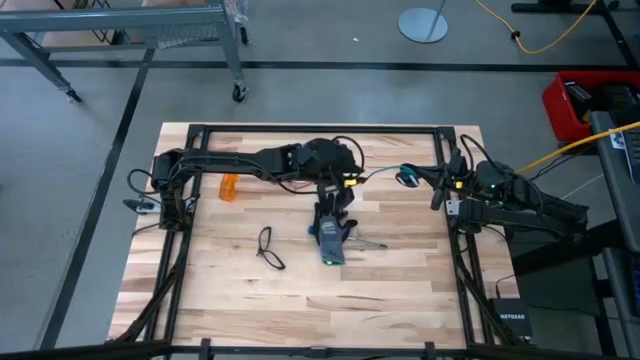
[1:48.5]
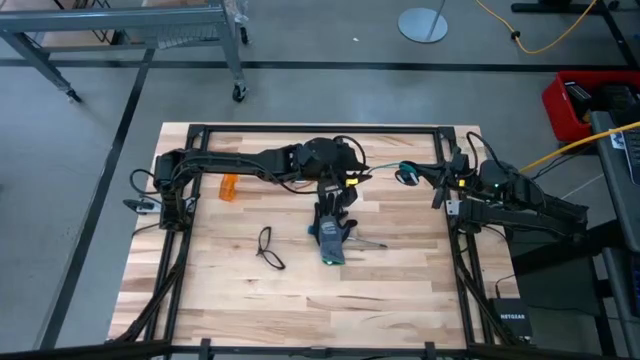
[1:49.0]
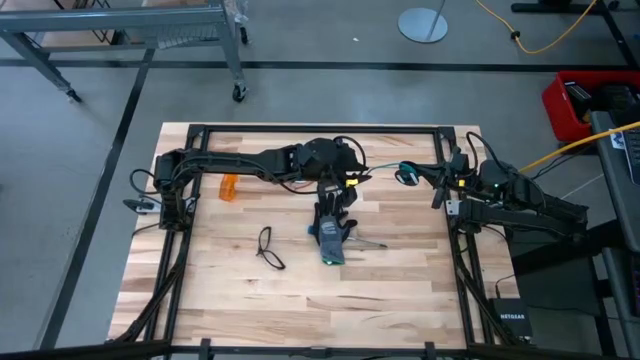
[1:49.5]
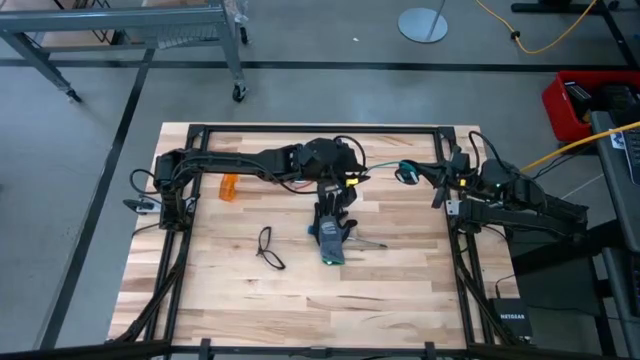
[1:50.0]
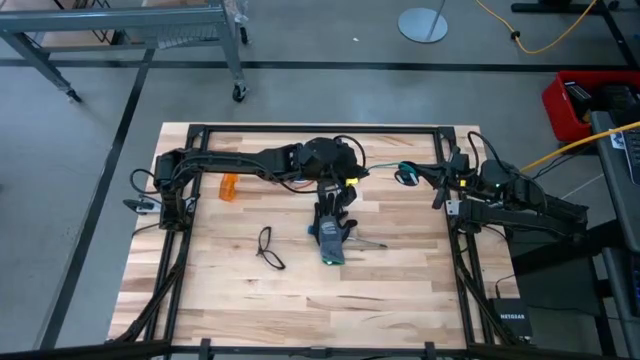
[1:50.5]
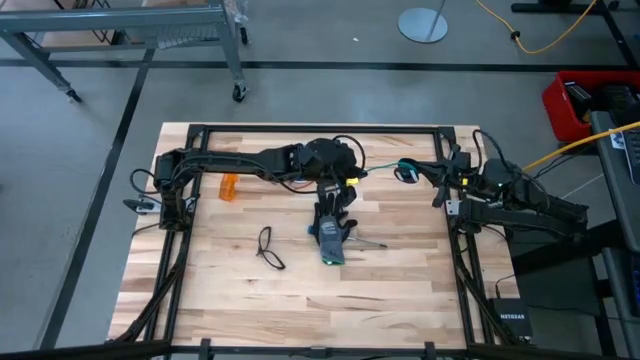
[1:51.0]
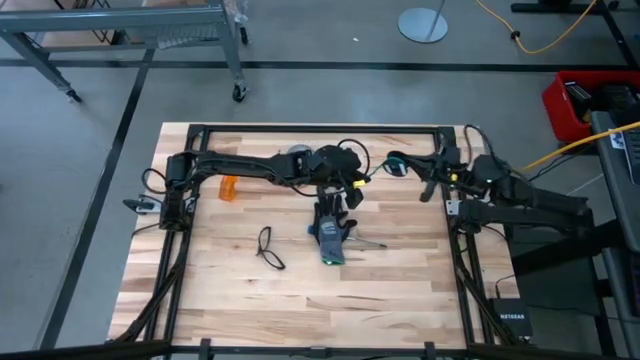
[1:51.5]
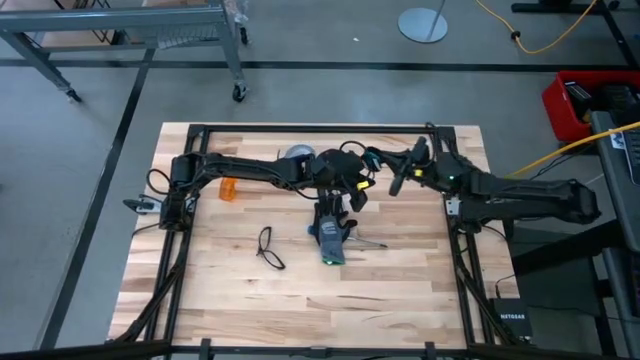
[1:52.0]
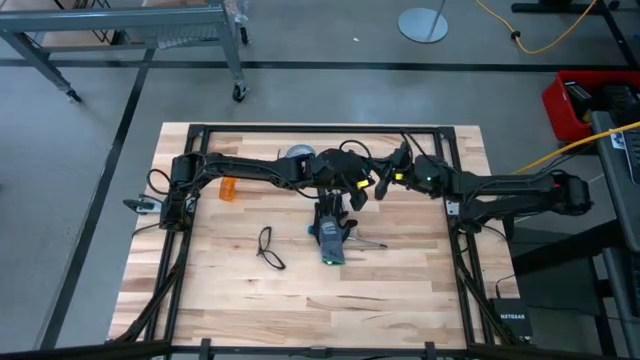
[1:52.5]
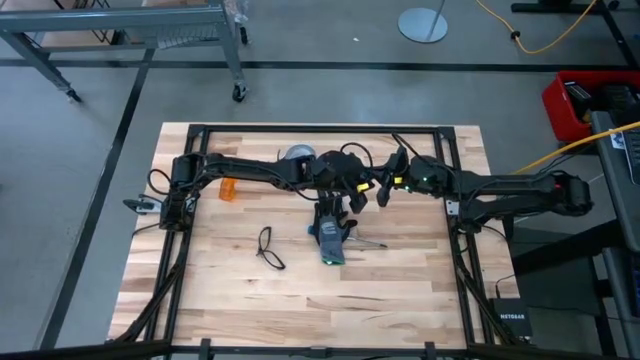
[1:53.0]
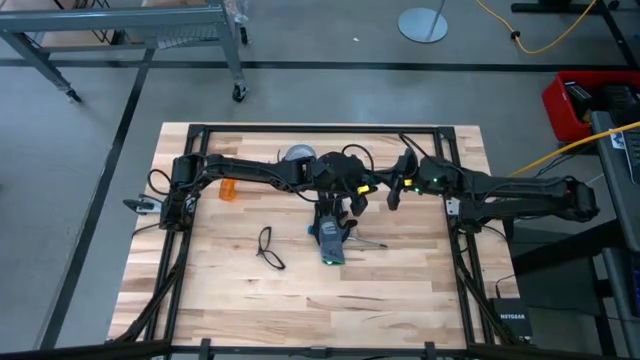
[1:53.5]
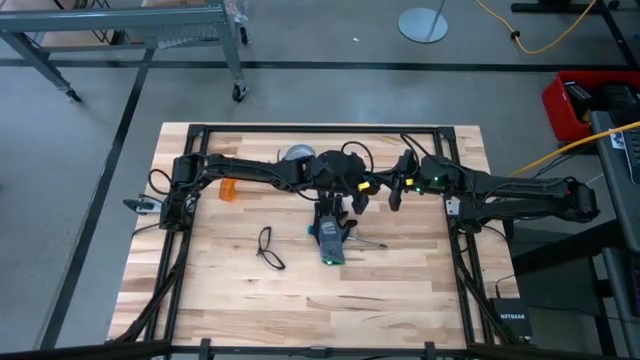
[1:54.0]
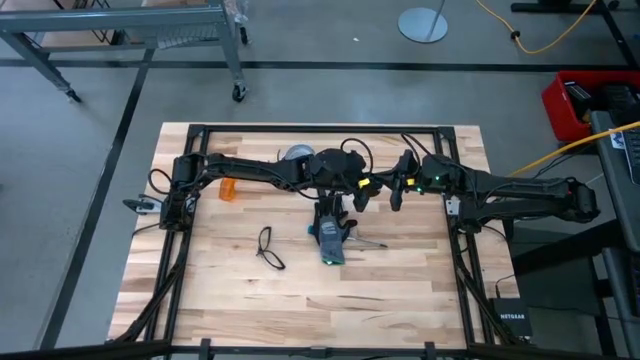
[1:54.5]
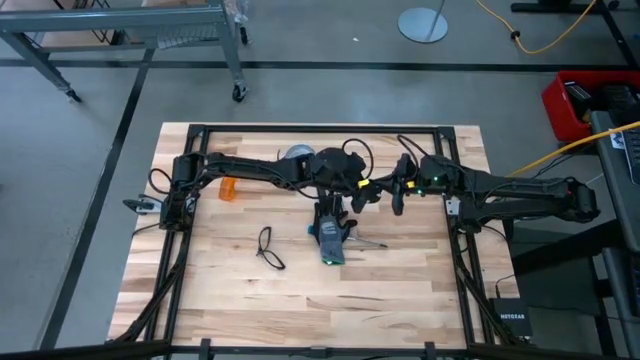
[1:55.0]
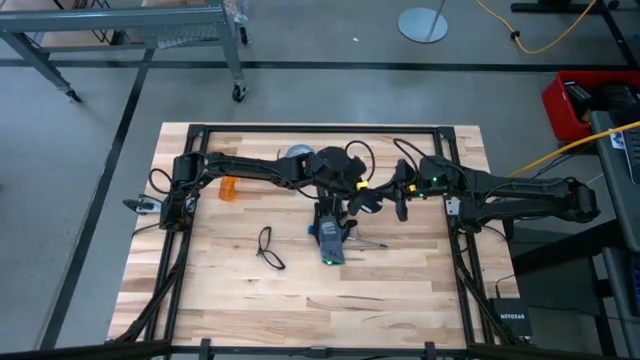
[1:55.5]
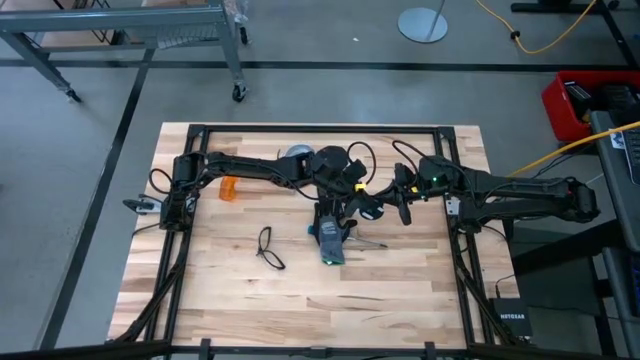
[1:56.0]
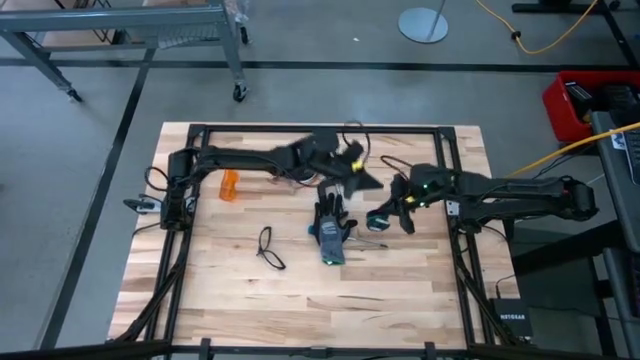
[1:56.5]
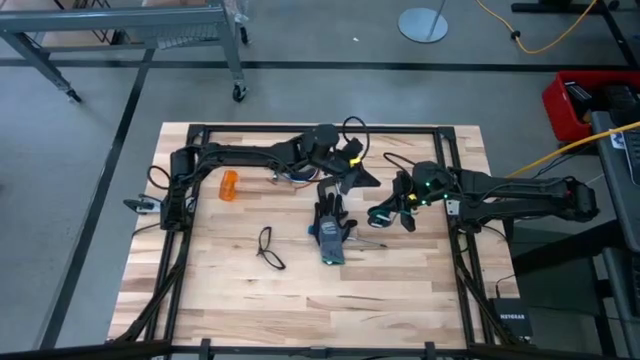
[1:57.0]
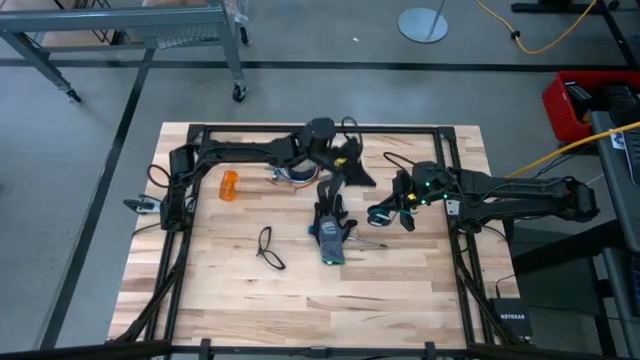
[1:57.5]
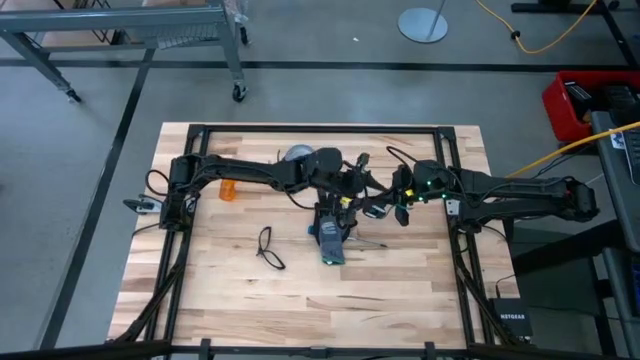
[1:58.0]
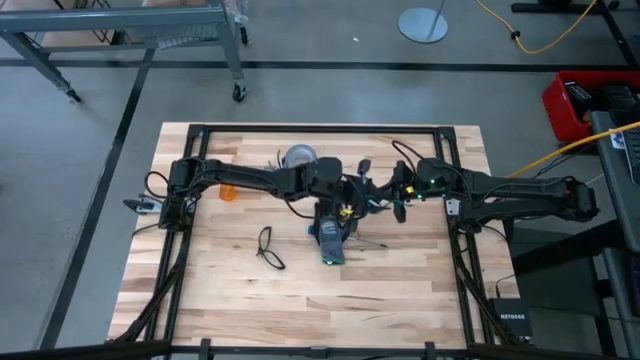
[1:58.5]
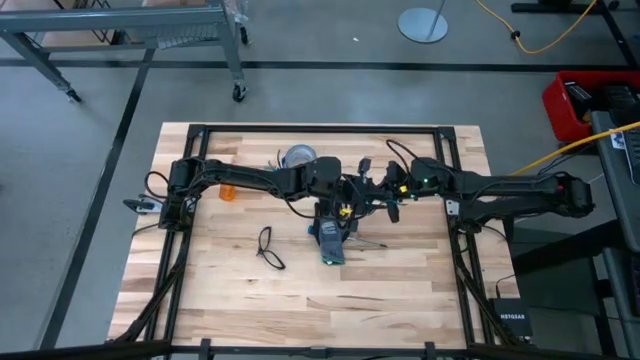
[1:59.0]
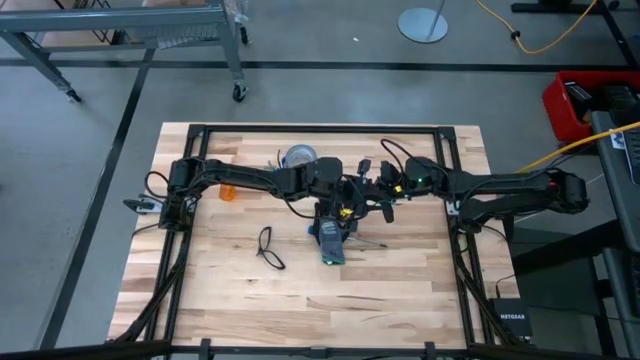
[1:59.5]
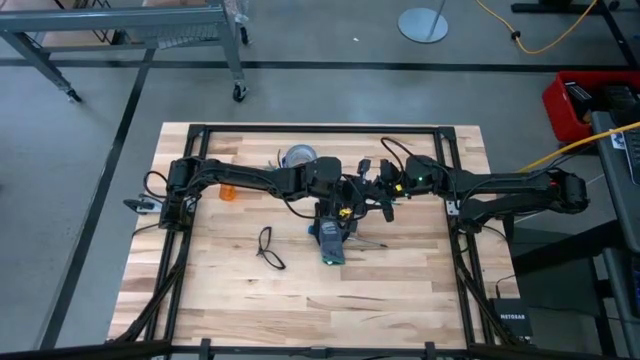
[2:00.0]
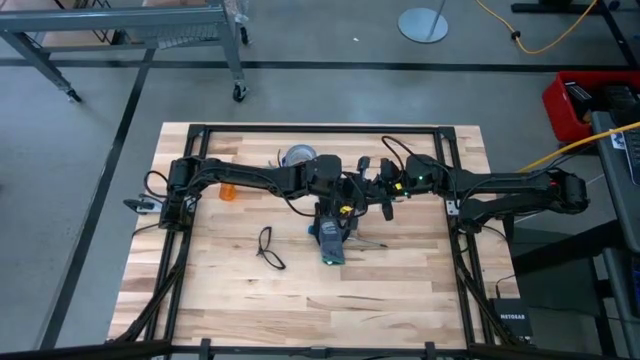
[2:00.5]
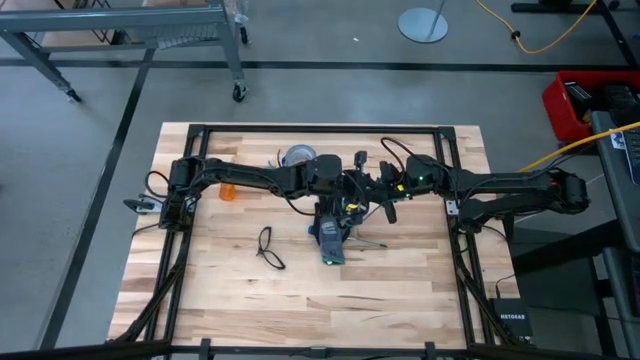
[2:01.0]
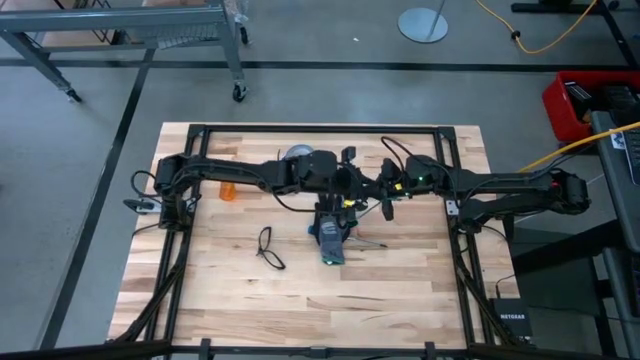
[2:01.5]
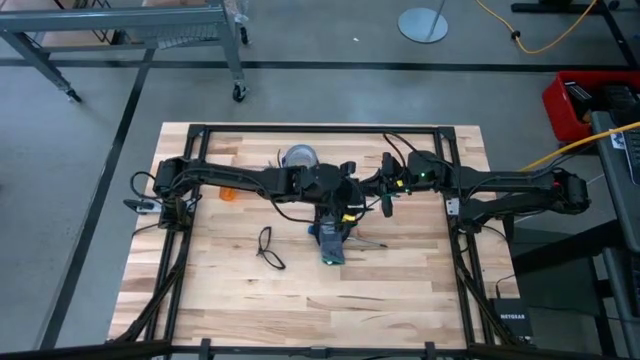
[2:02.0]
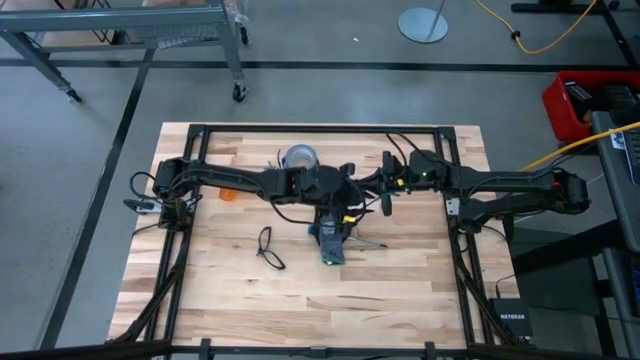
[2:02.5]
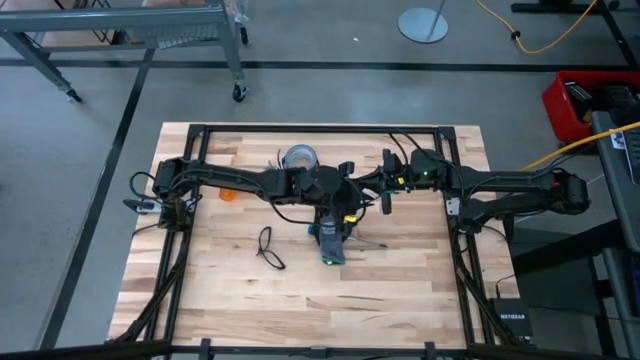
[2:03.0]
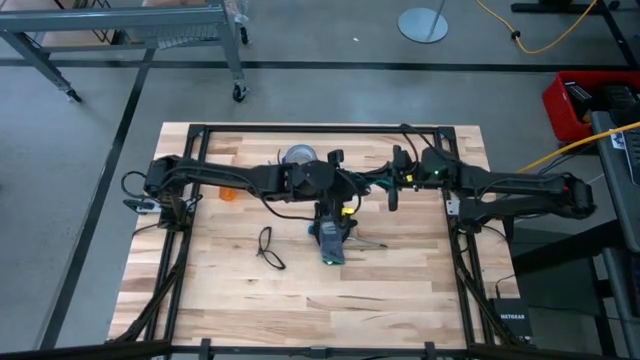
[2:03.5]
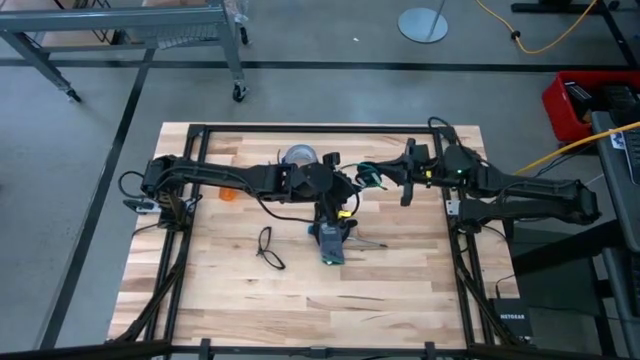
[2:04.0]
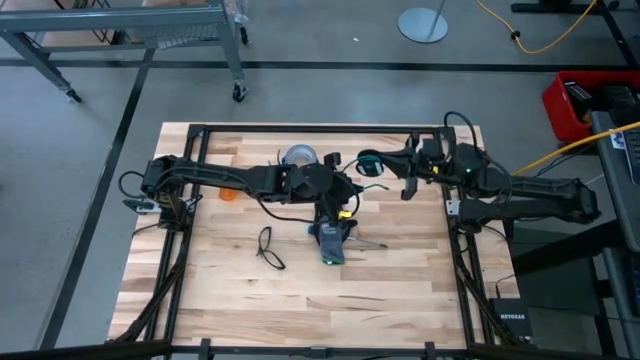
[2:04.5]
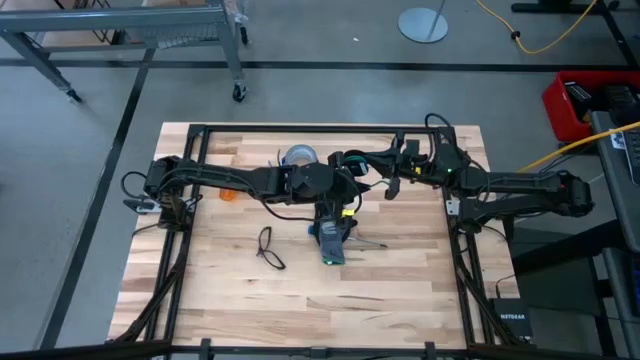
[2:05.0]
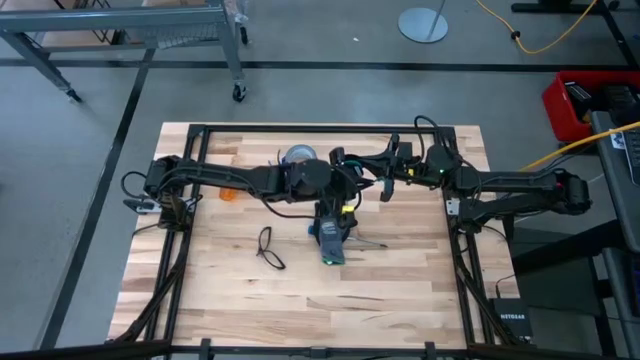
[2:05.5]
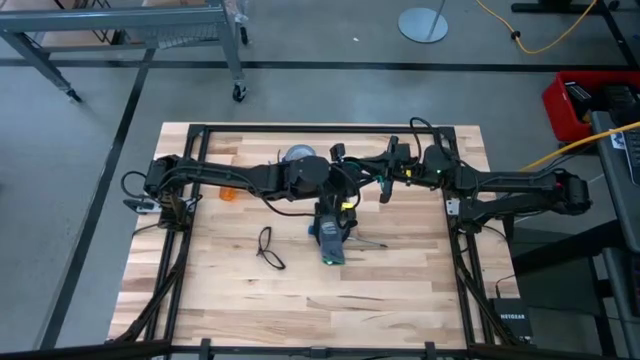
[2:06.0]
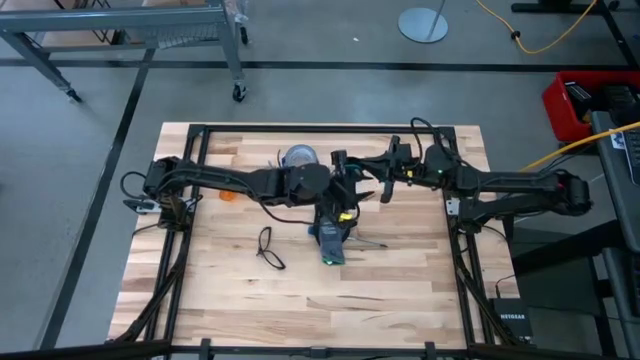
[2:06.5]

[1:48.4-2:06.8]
Task: Coil cords
Coil the green wire on the black spool

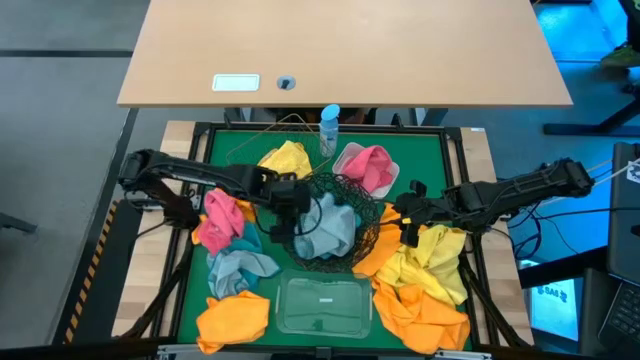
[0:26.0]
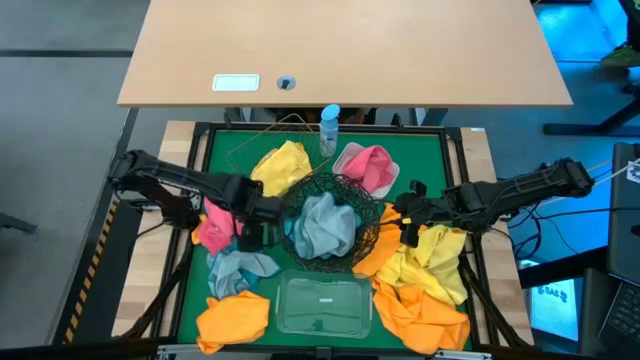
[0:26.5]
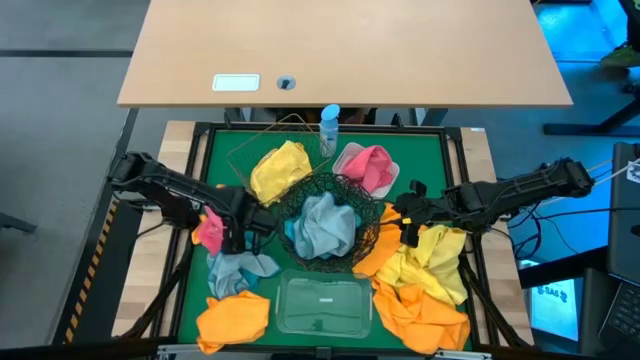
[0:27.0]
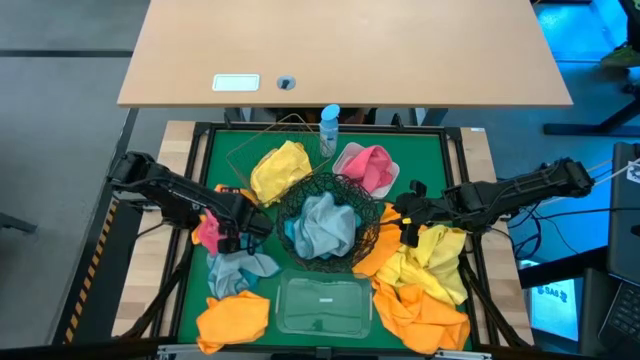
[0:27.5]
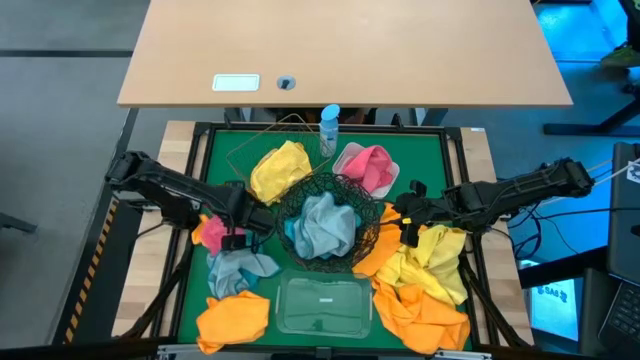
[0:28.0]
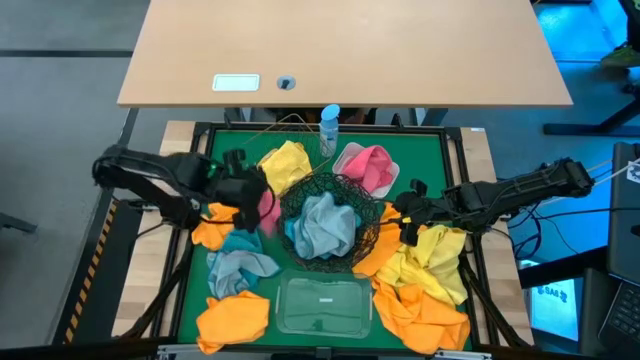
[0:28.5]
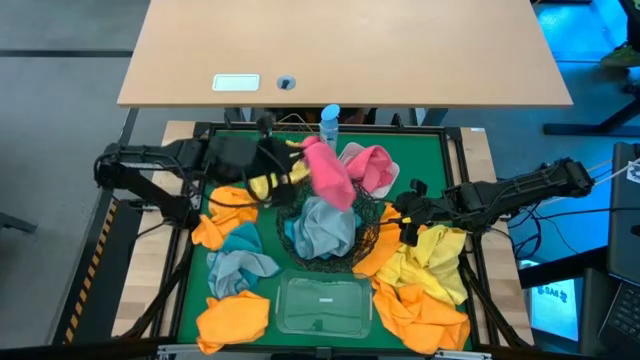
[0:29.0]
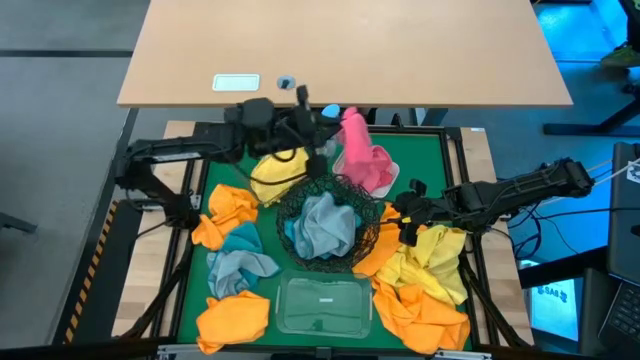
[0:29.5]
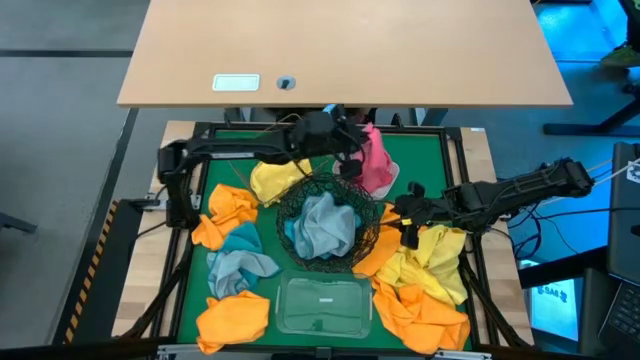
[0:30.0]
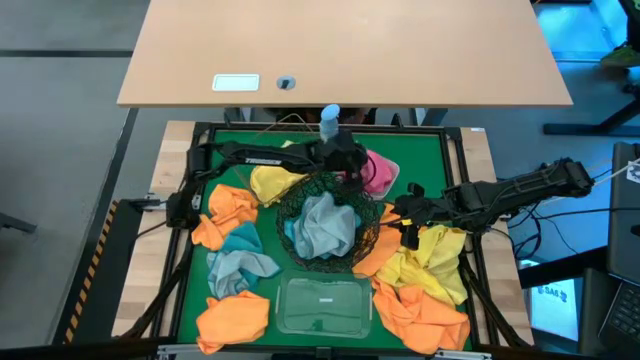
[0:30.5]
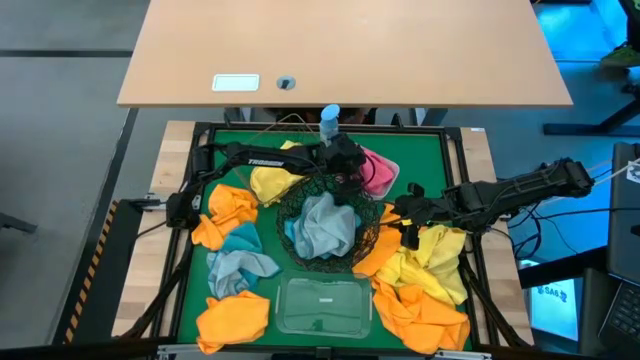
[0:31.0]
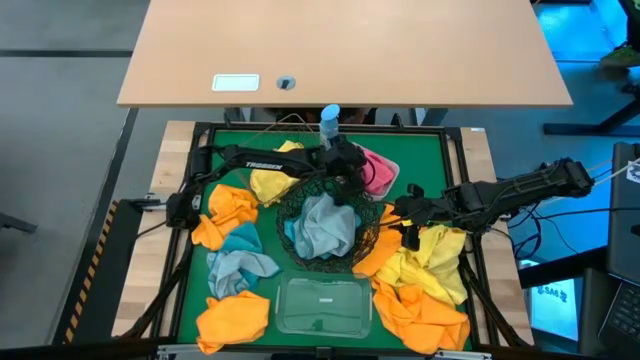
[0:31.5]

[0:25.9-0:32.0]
Task: Sort microfiber towel by color & place in baskets
Put the pink microfiber towel into the white bin
